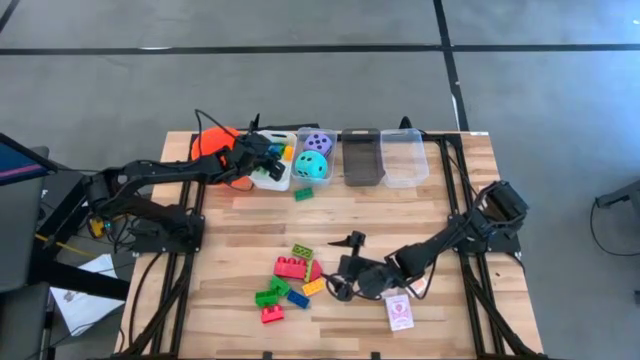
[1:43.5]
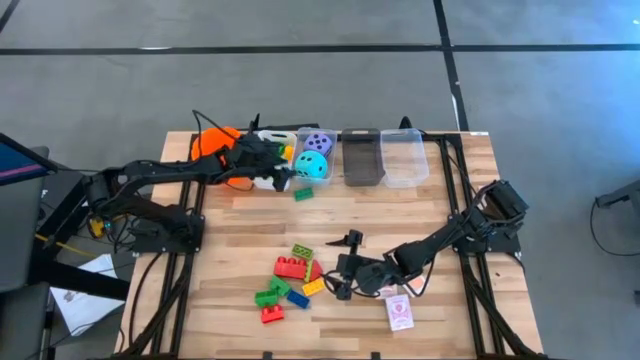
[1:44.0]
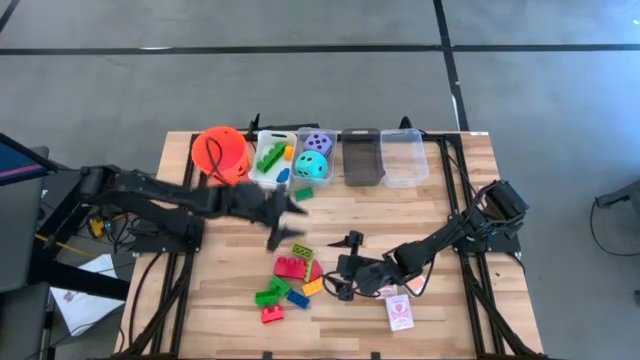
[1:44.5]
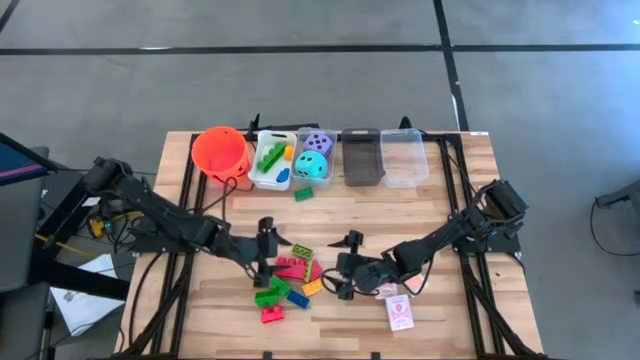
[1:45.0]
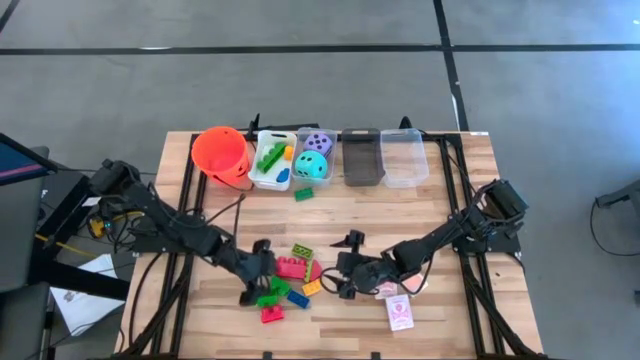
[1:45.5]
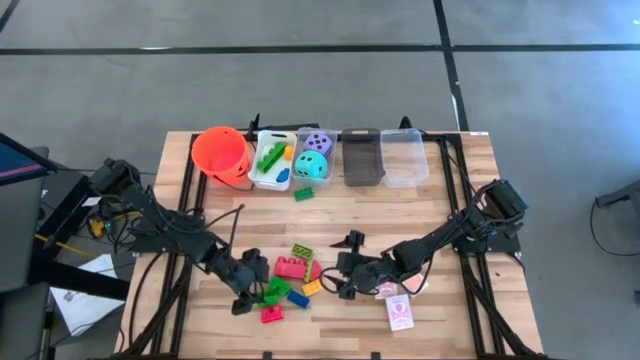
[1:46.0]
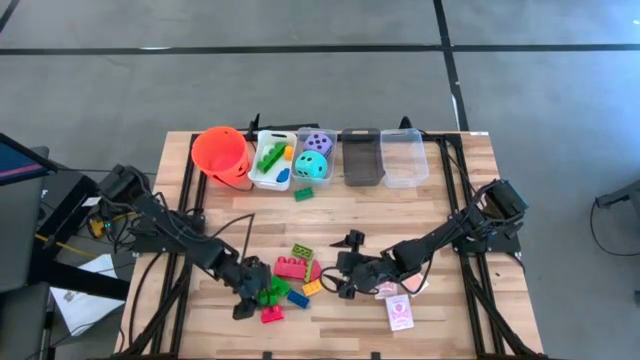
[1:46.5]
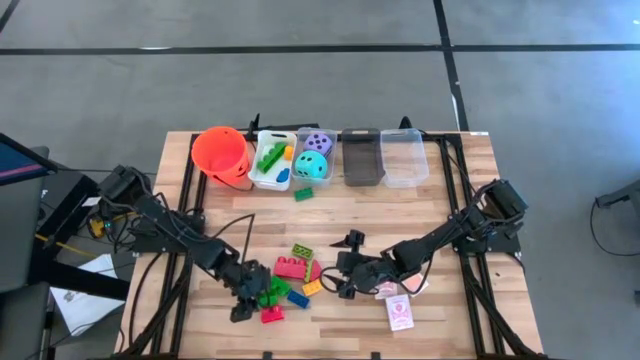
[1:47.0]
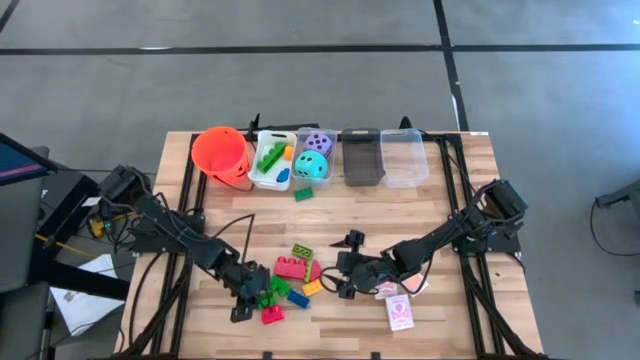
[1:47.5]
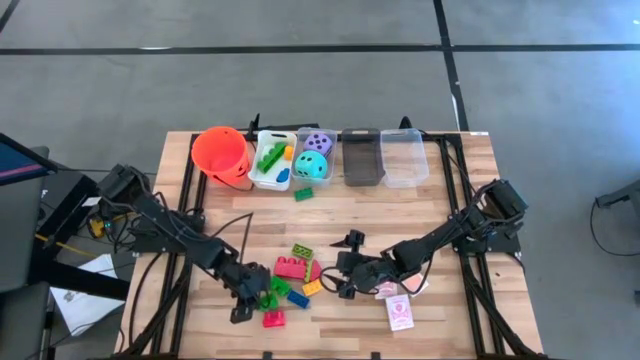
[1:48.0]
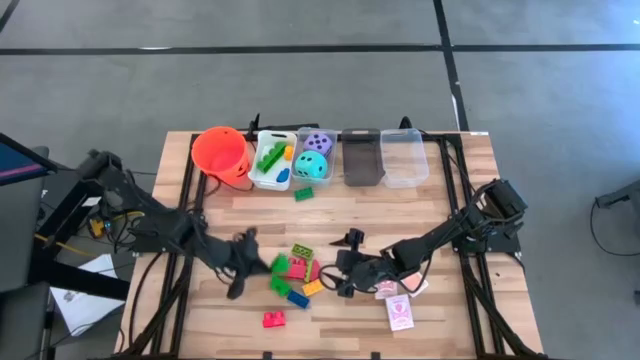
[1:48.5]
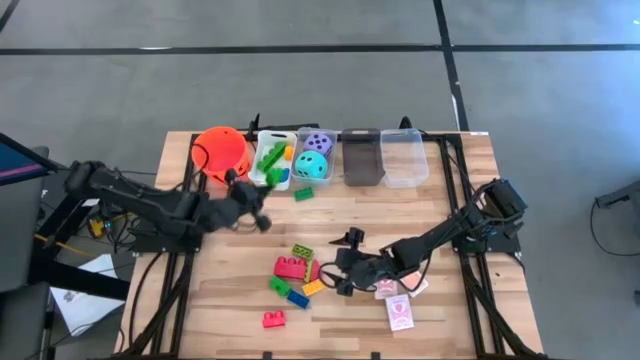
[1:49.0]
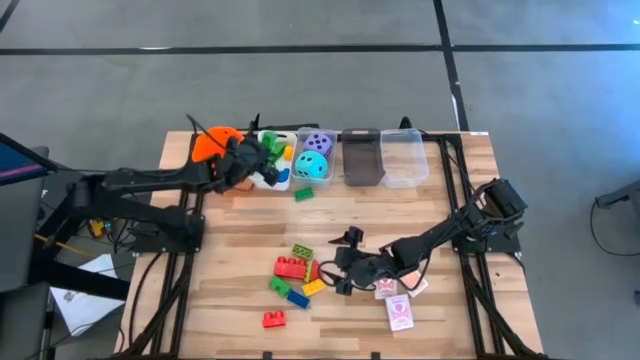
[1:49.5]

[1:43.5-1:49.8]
Task: Pick & Place Toys
Put the bottom large green game piece into the white bin

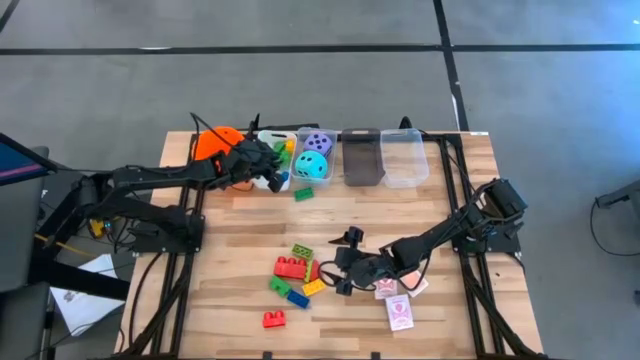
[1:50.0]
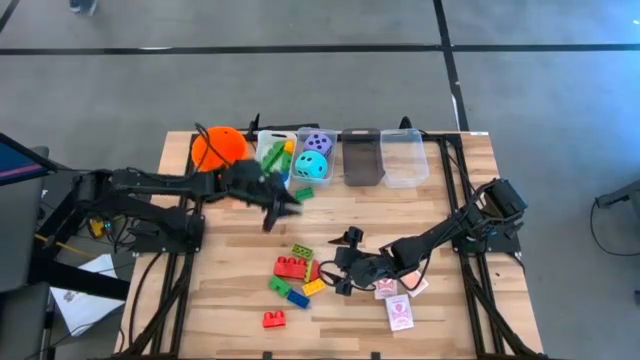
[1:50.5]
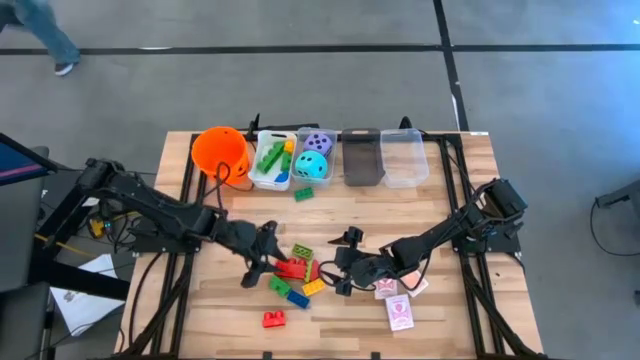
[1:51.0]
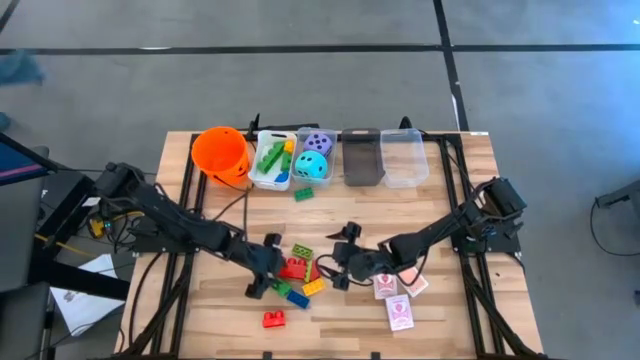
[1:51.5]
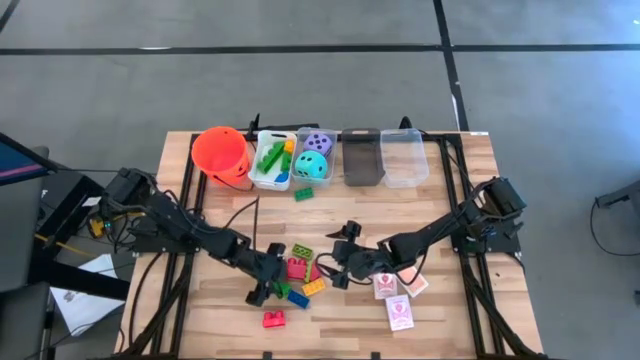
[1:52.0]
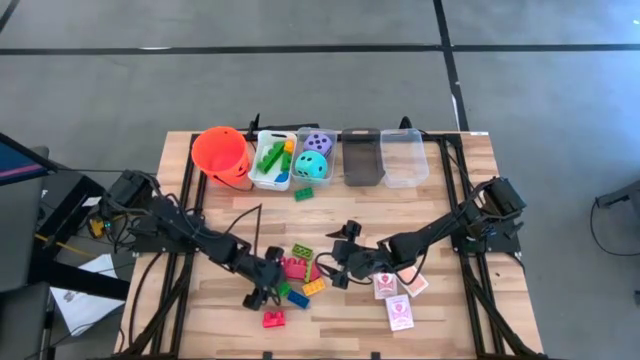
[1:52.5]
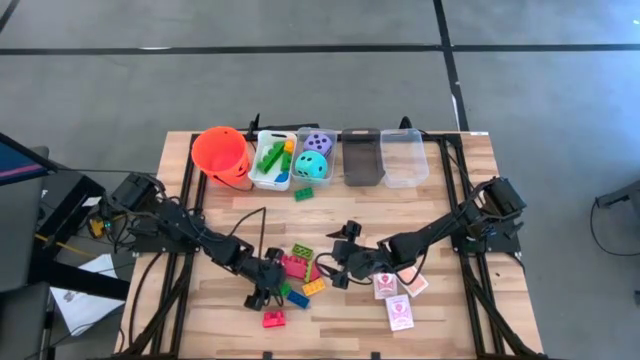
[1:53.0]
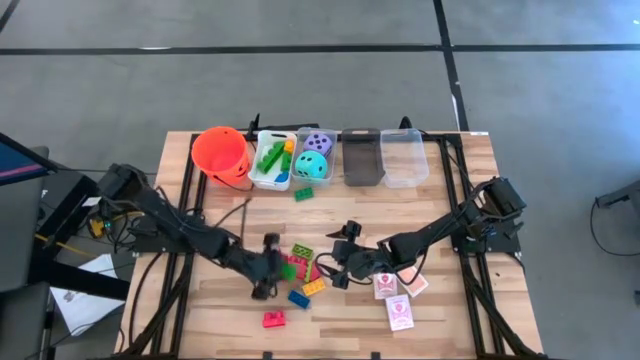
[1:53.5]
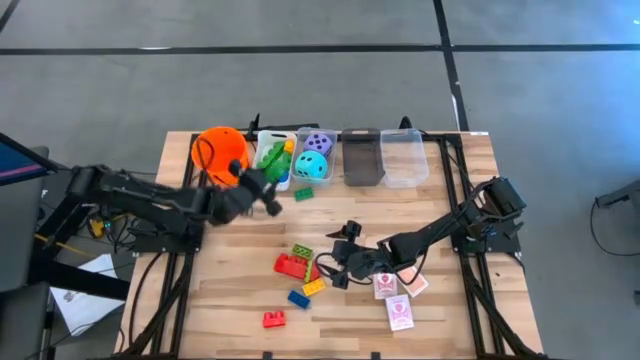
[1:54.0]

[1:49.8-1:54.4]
Put the large green game piece into the white bin

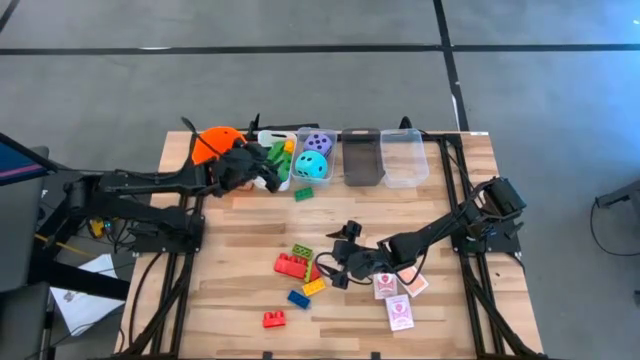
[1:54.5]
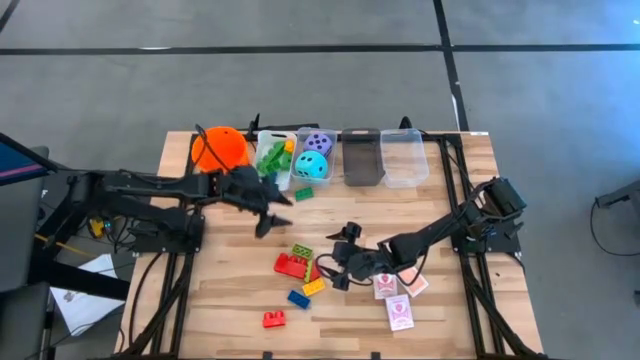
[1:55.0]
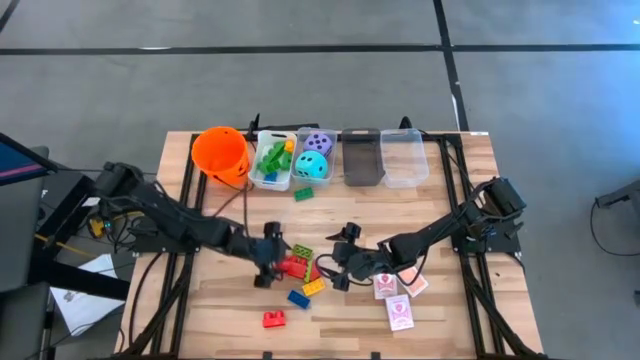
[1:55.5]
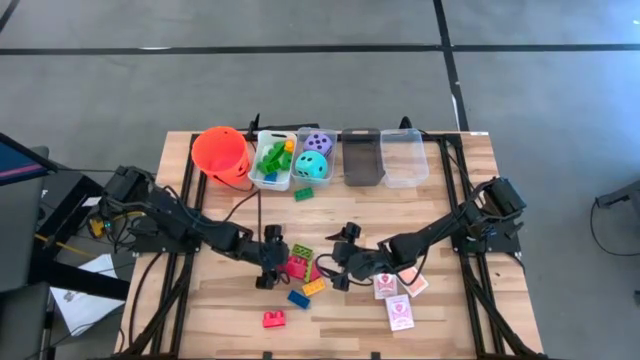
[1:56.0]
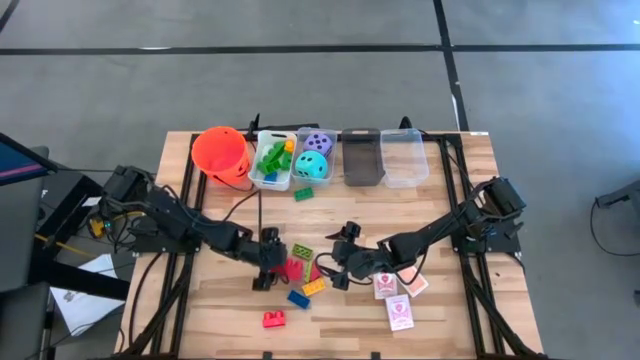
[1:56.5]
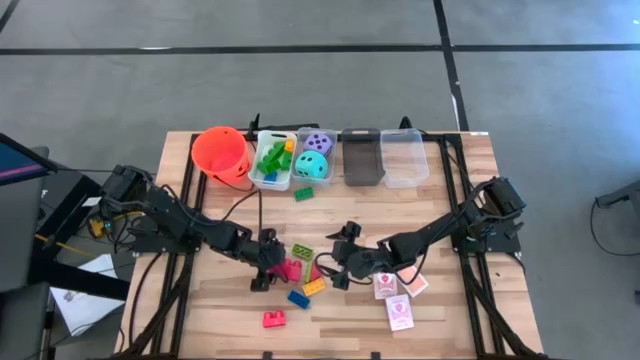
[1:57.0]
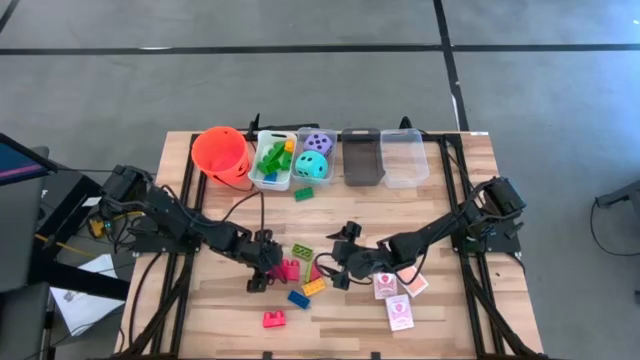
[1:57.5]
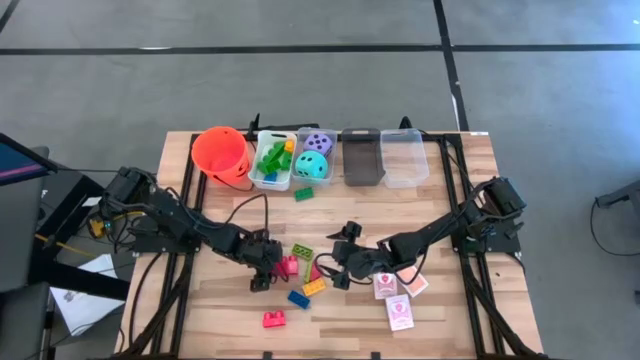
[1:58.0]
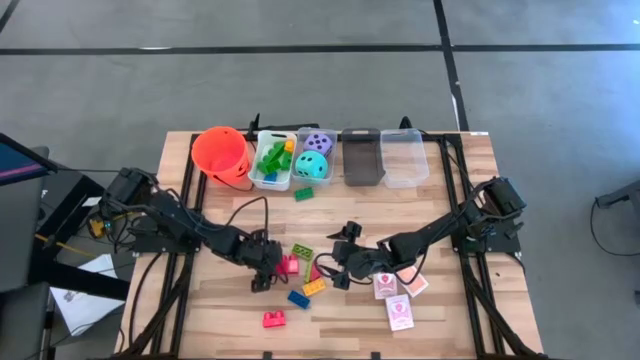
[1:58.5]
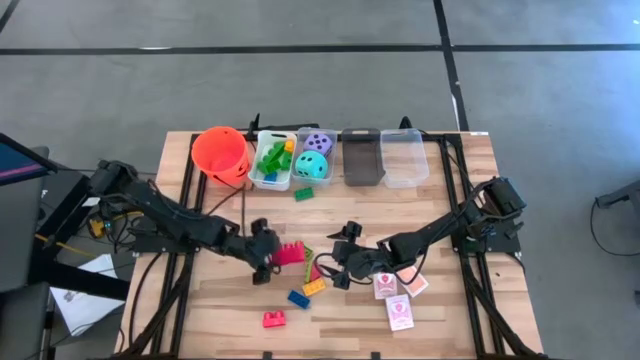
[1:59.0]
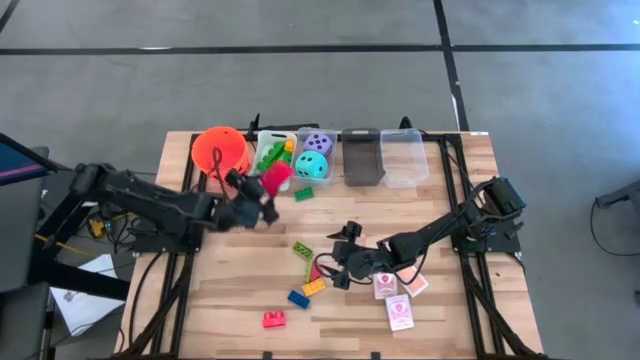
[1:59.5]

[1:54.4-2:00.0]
Put the top large red game piece into the white bin

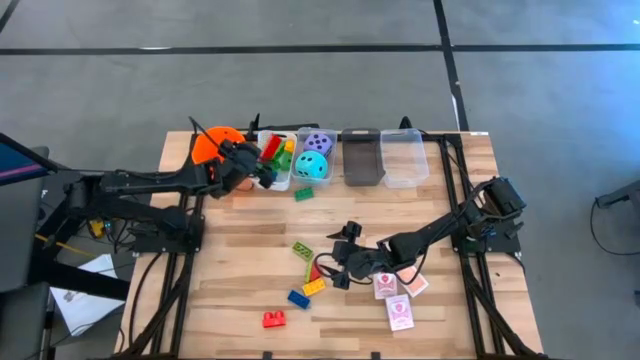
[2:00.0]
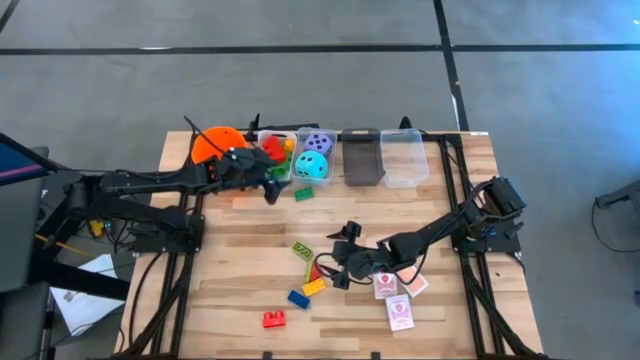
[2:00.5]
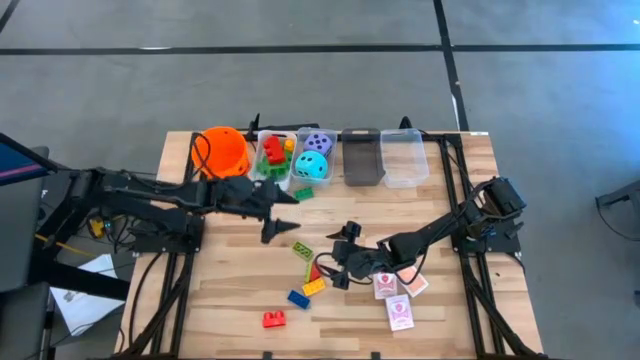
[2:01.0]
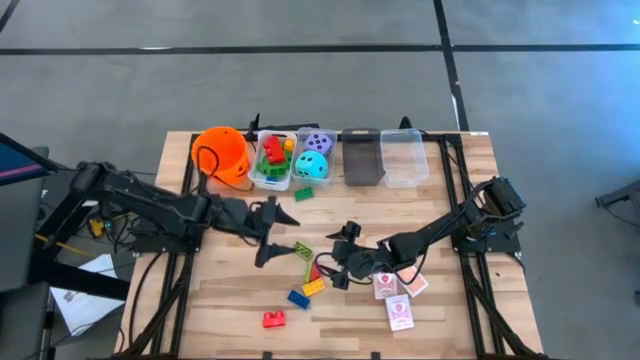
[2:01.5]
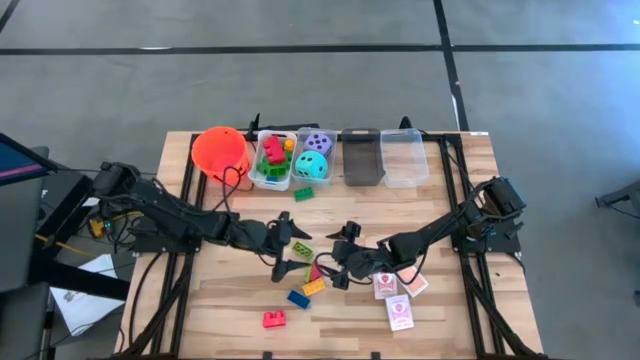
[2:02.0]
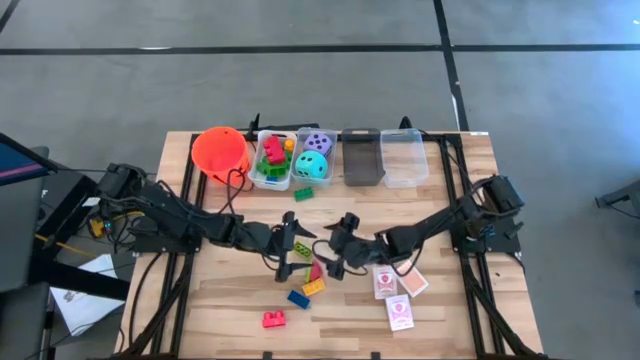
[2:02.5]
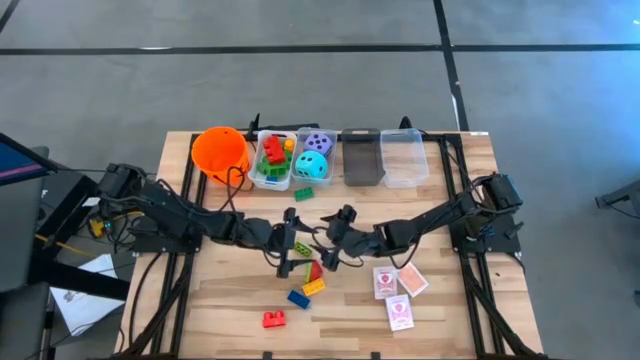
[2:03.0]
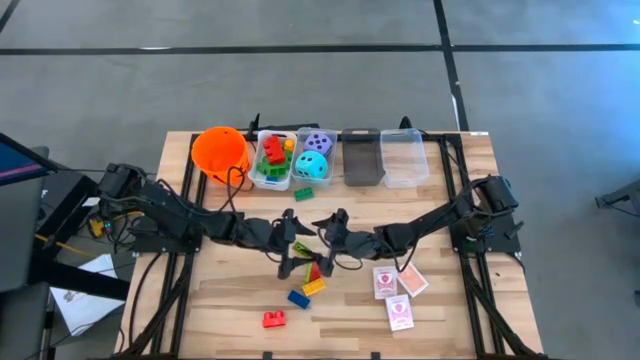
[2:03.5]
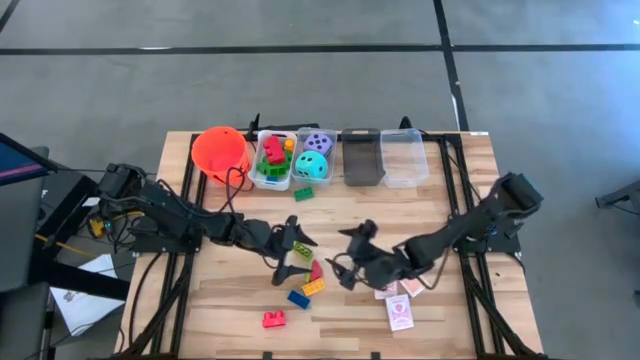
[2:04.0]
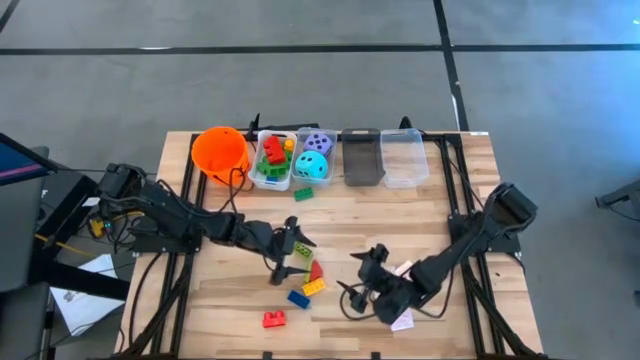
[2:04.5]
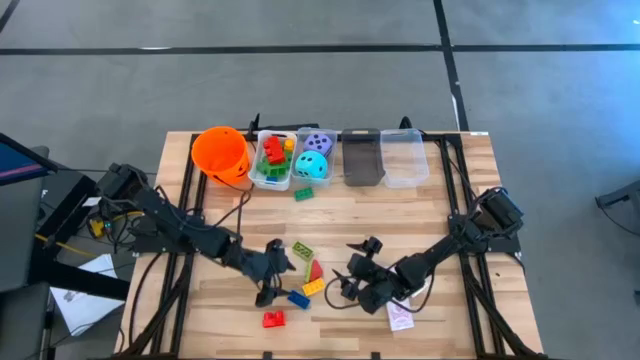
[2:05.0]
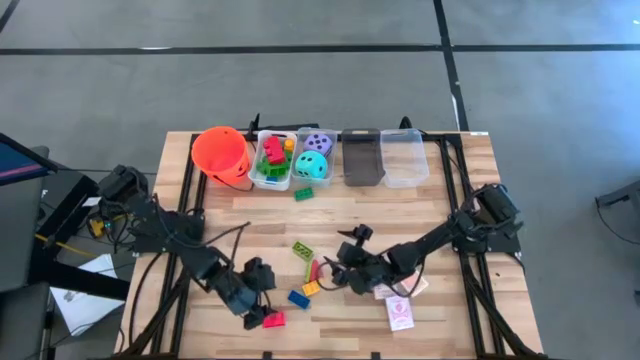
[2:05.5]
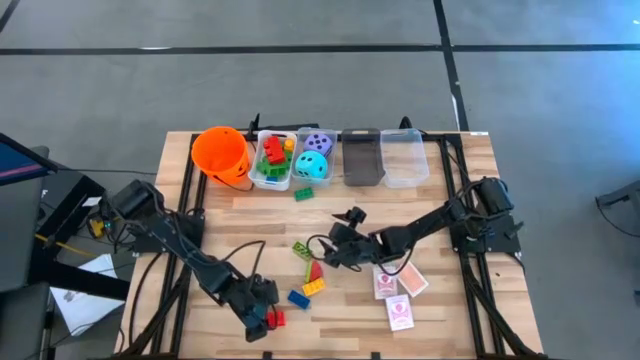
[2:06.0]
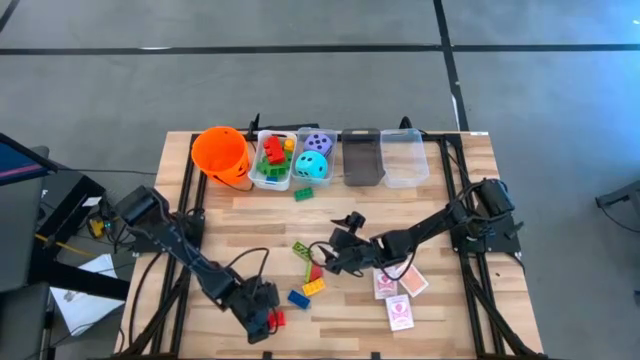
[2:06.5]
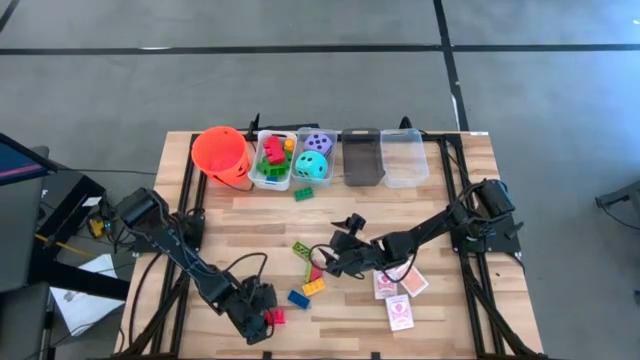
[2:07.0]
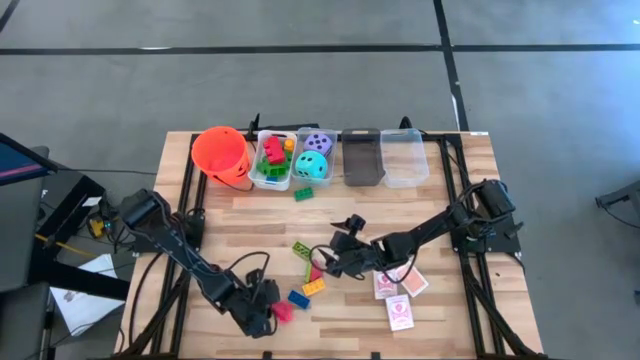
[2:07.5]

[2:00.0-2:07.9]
Put the large red game piece into the white bin
